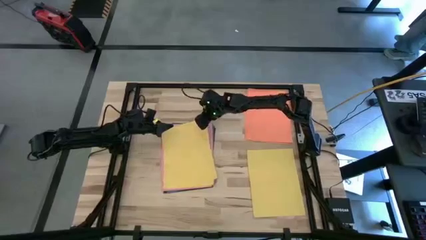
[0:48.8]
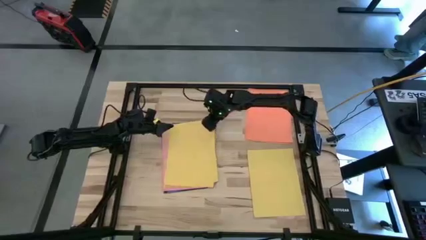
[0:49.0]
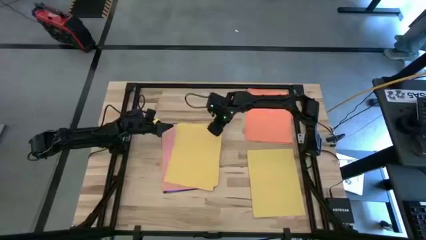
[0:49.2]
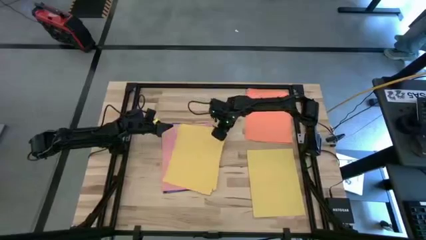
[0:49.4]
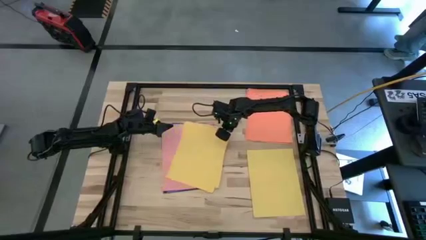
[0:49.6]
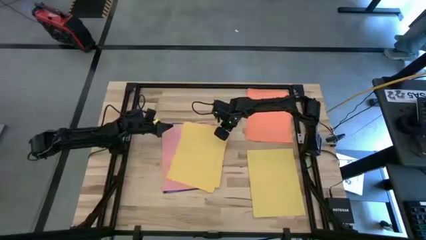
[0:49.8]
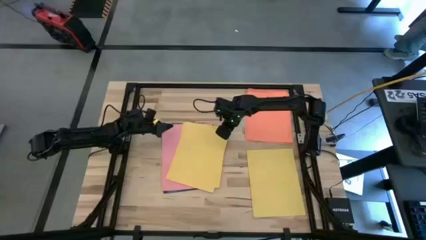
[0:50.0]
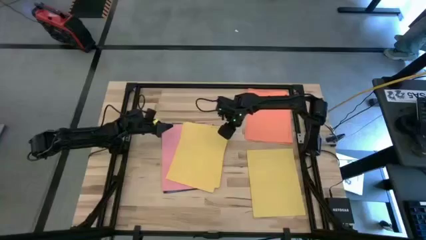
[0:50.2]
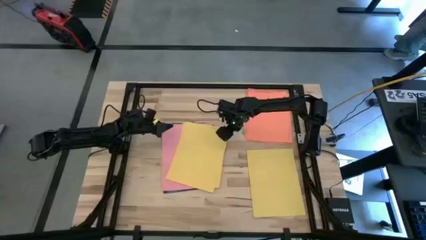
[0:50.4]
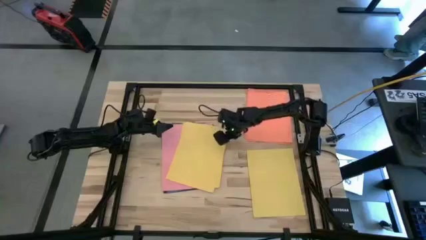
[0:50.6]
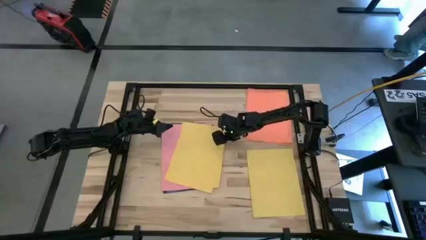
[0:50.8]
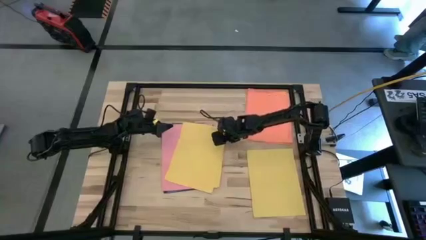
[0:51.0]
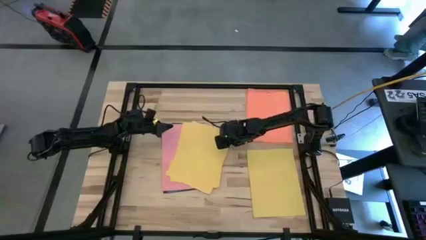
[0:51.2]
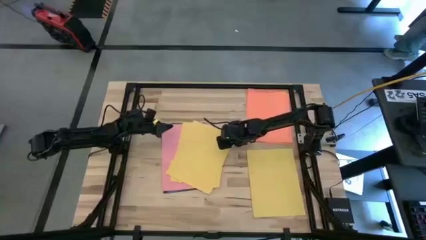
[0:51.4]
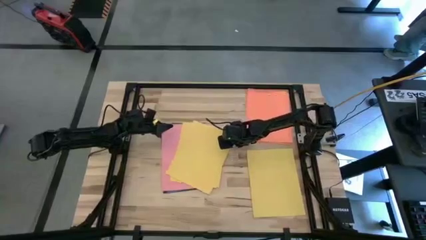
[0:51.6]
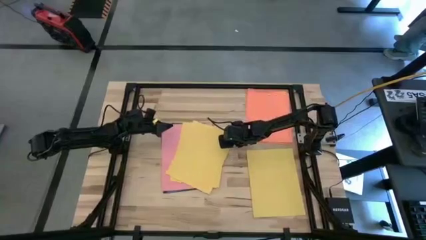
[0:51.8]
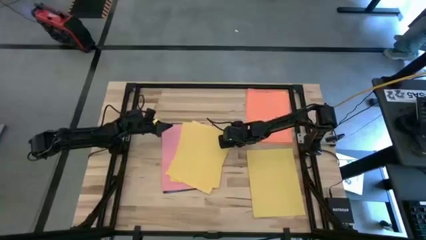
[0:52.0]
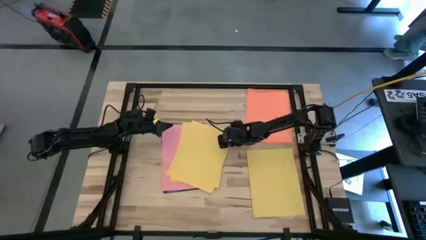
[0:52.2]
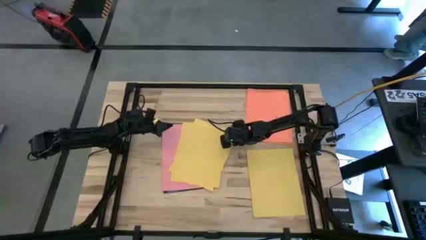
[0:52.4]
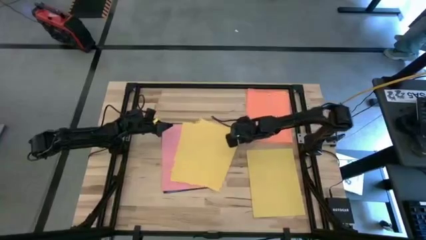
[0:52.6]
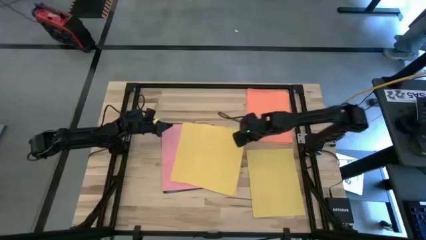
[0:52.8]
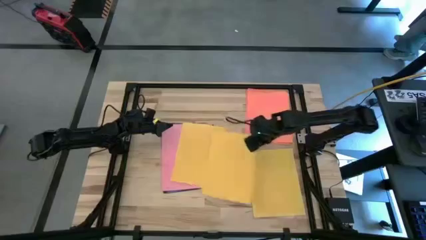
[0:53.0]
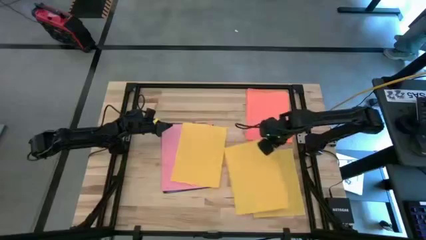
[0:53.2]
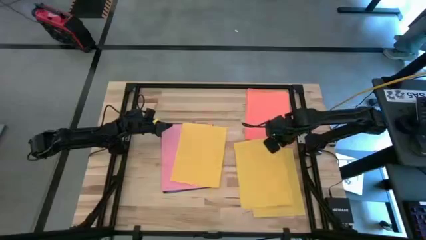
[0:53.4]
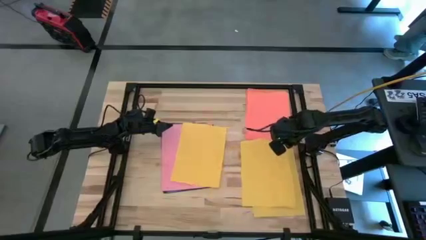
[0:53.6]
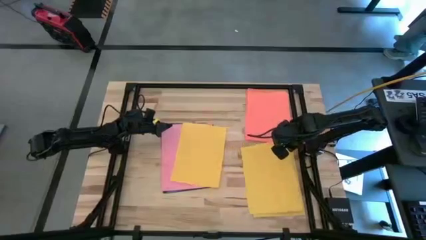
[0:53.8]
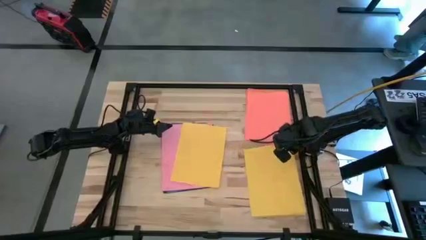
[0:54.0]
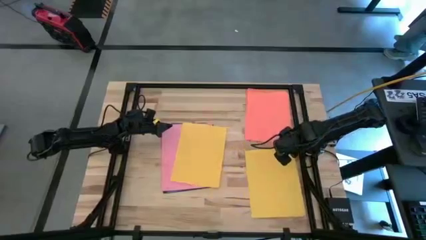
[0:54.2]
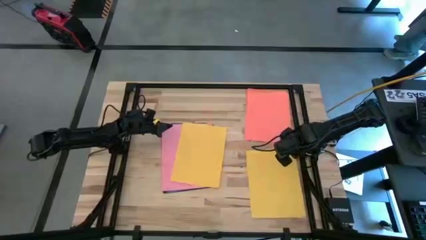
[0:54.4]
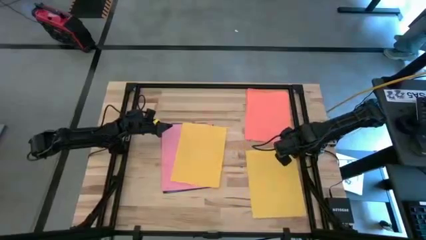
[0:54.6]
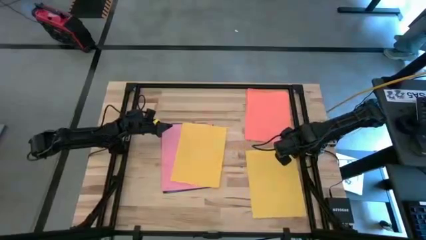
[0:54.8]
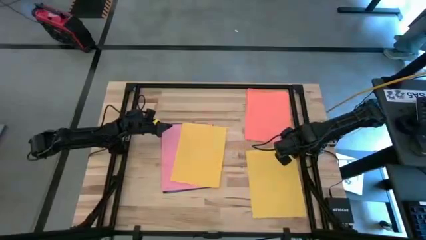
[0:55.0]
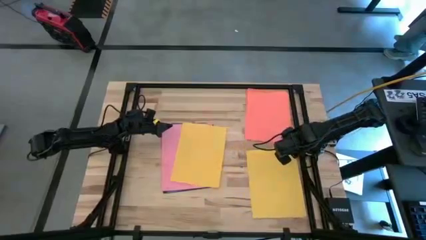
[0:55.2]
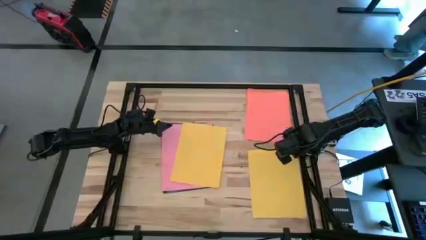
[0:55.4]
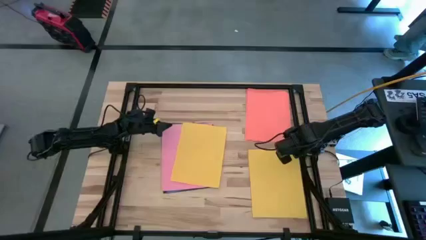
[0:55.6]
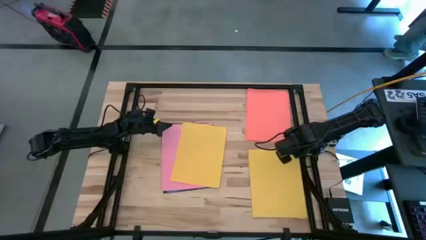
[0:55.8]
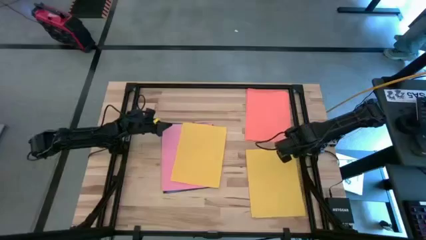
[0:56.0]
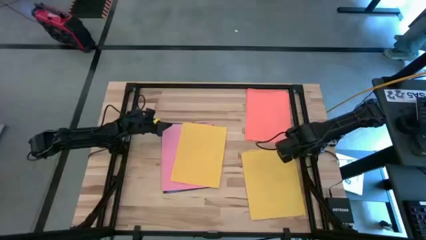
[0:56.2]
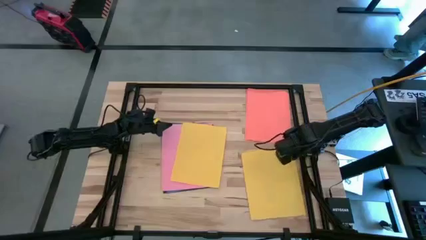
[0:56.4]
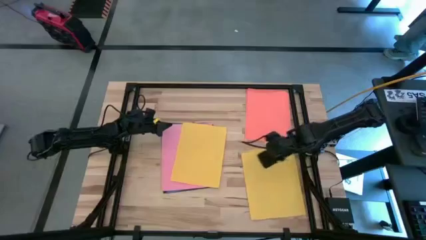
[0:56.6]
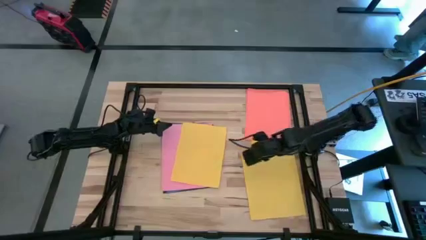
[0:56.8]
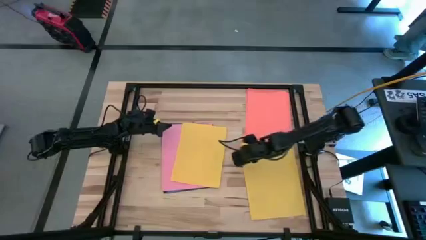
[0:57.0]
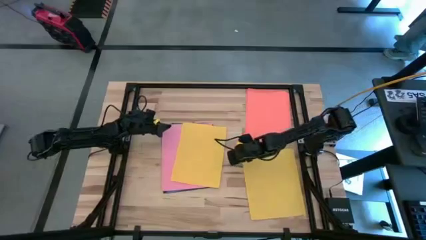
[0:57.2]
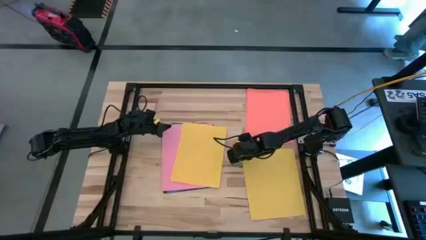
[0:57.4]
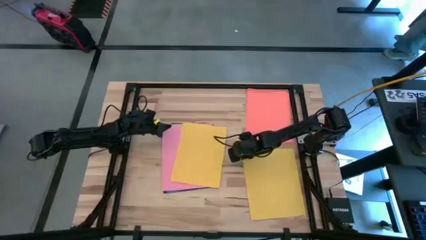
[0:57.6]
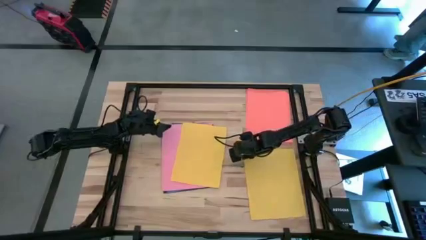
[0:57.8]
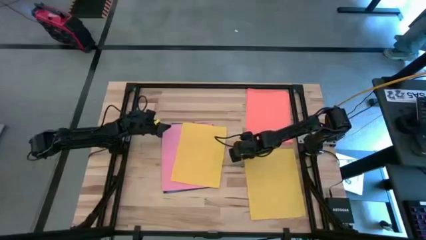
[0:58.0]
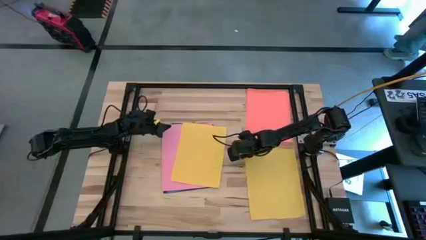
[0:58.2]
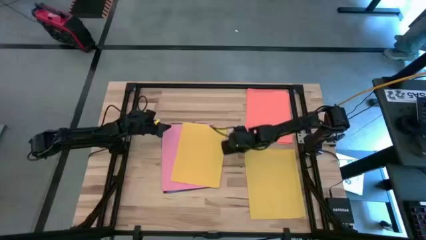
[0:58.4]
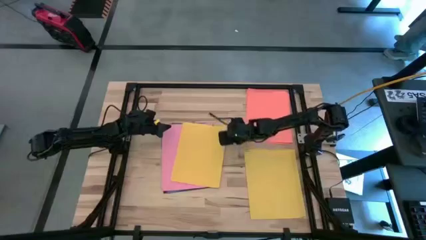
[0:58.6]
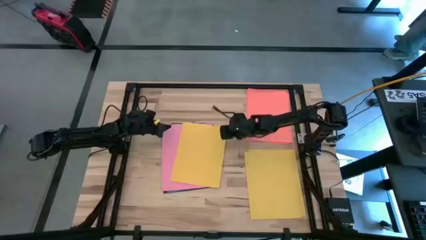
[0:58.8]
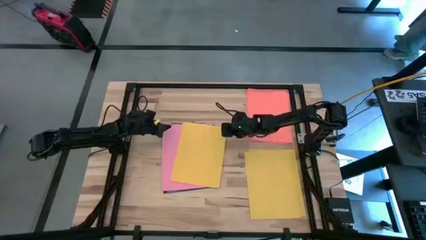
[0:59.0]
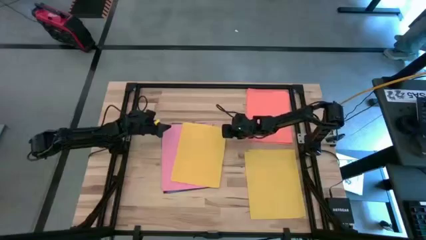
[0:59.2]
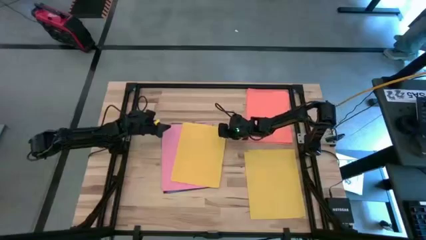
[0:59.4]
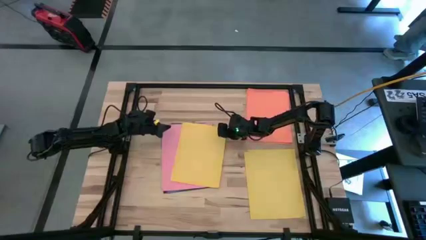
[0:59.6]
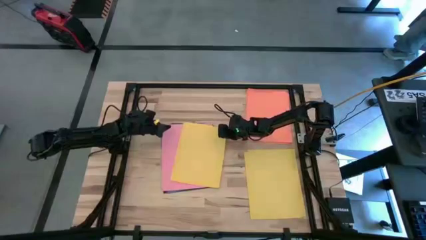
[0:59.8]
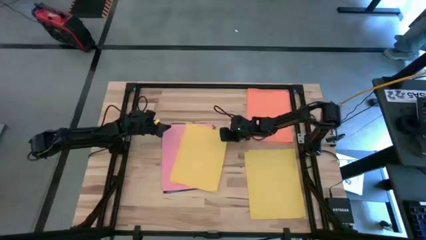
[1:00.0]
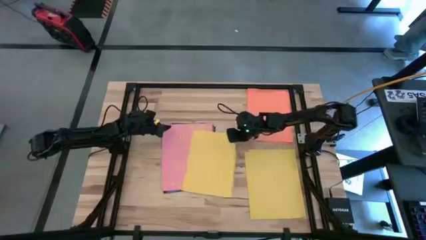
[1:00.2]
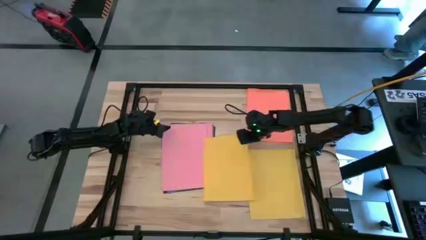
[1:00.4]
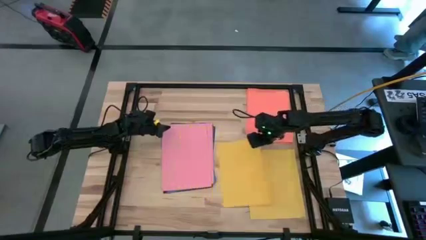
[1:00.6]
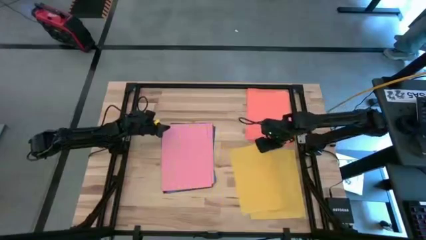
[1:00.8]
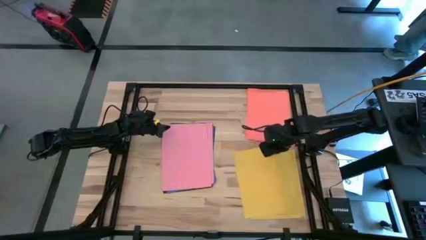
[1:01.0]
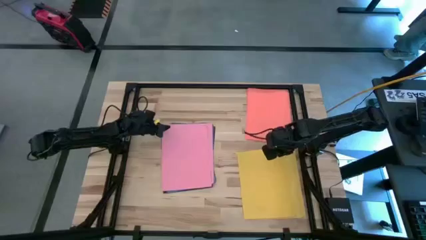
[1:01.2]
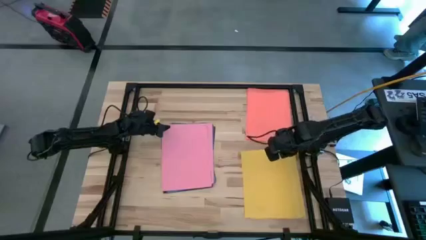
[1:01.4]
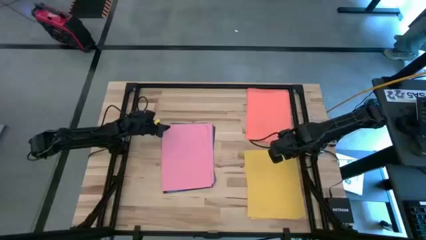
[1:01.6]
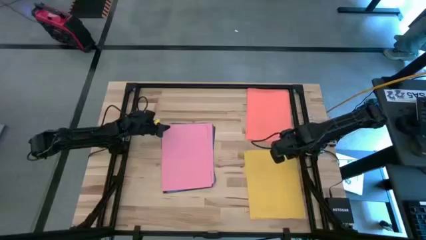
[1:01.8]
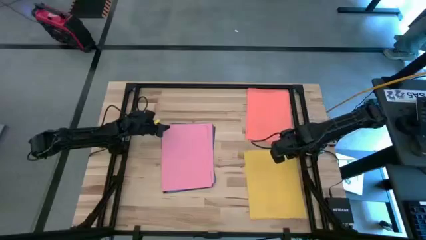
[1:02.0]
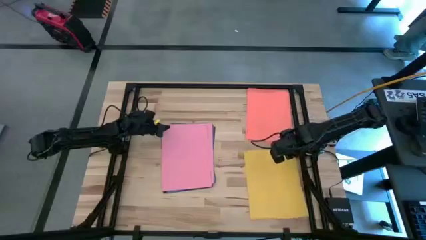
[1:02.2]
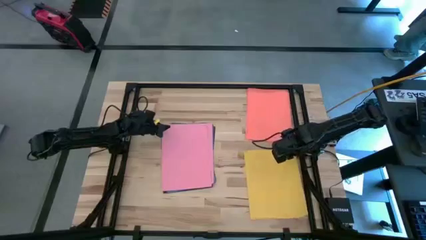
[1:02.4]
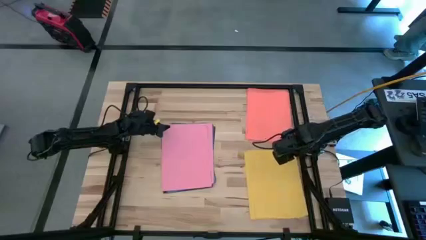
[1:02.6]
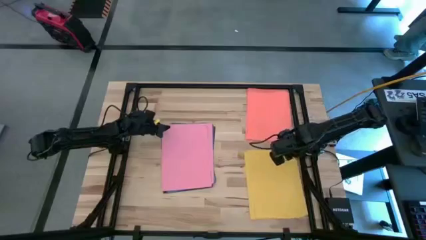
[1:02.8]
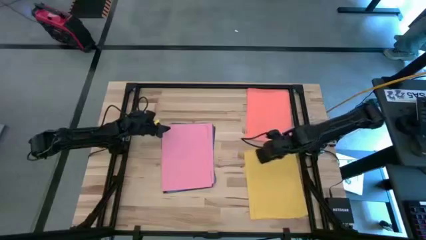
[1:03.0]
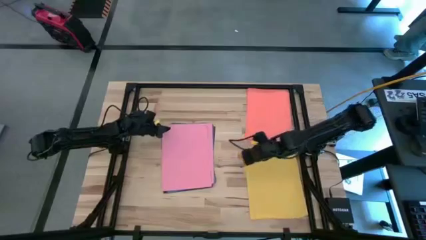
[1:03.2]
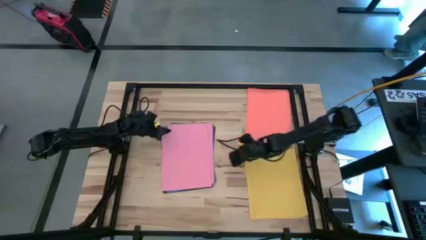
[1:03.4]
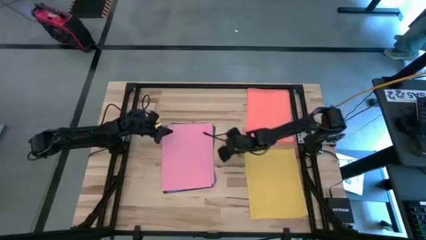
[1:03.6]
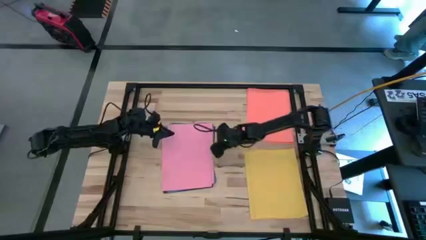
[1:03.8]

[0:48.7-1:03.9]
Task: Organize paper
Put all of the yellow paper at the bottom right of the table

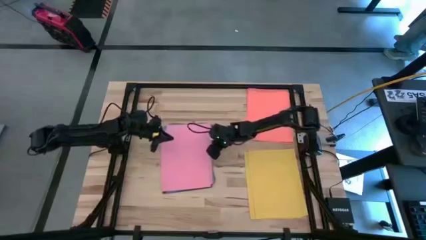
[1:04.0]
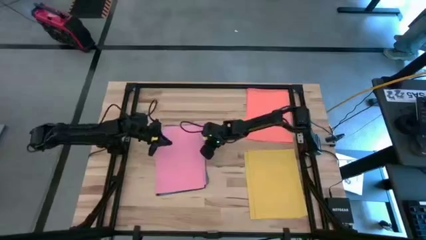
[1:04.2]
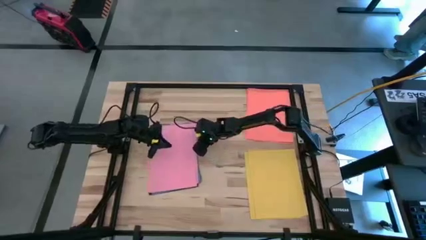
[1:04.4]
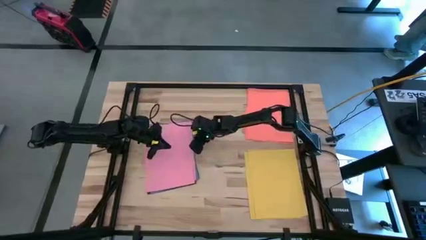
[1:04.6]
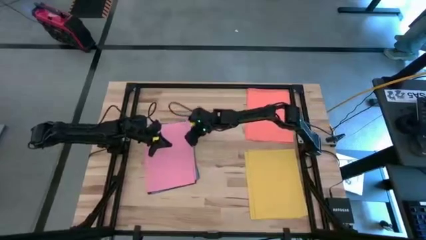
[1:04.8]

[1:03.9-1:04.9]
Move the papers

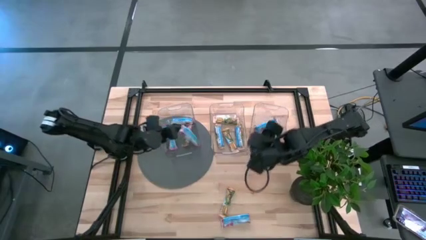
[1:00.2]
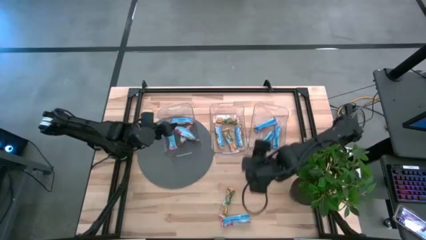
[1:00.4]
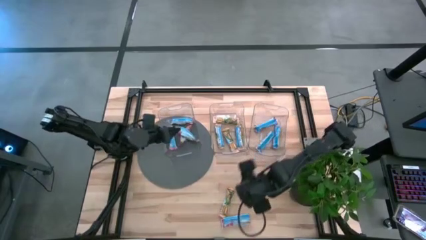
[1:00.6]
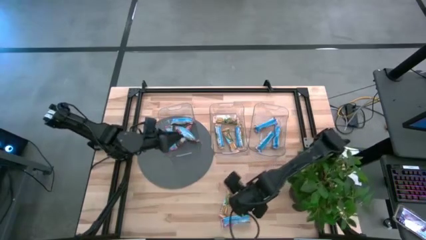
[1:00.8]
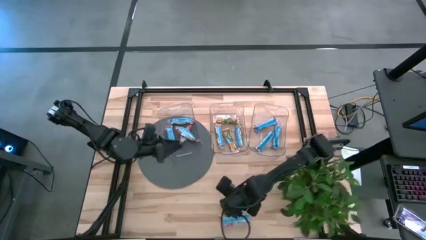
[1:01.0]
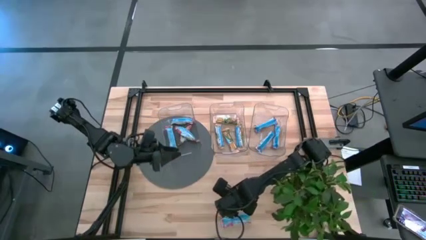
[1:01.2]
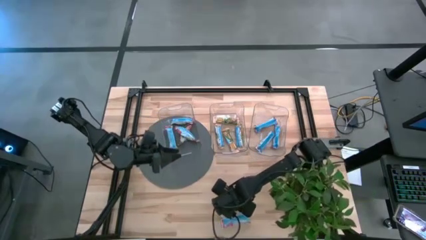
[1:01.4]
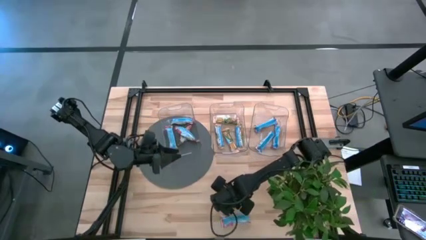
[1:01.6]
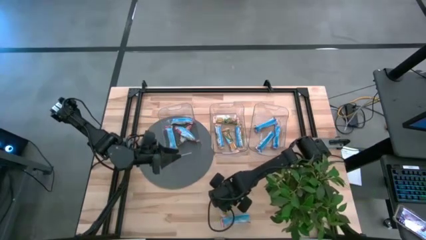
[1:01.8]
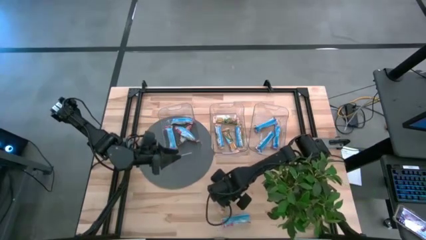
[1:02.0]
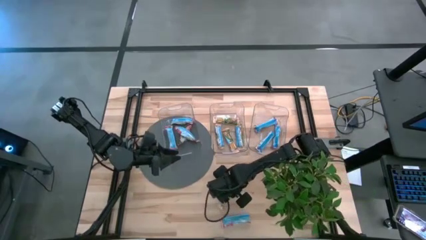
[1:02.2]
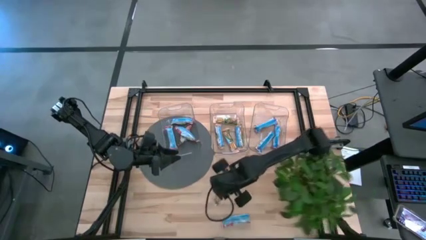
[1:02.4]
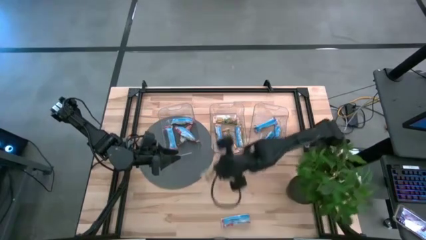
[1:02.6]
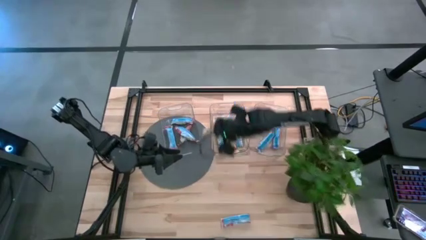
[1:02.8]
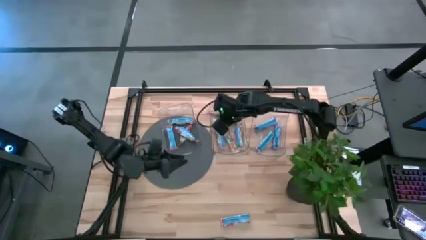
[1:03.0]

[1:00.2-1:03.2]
Task: Pick and place Granola Bars by type
Put the yellow granola bar into the middle transparent bin
